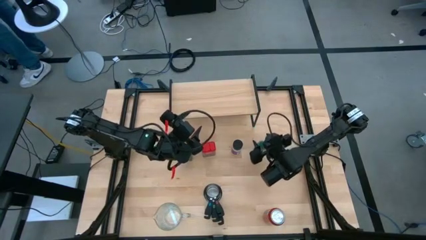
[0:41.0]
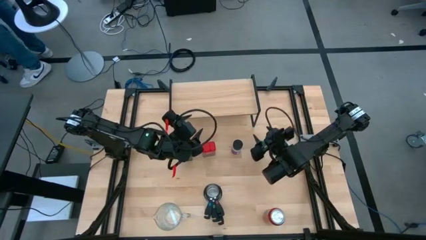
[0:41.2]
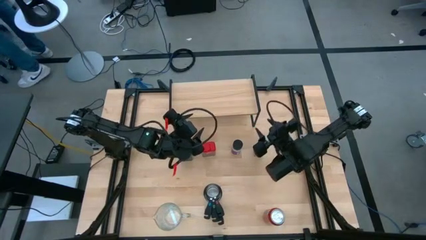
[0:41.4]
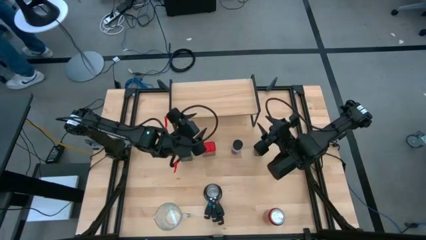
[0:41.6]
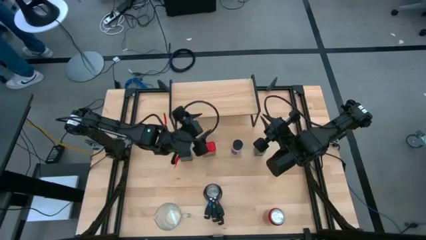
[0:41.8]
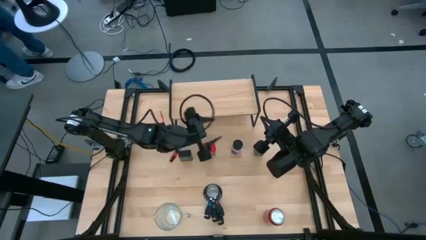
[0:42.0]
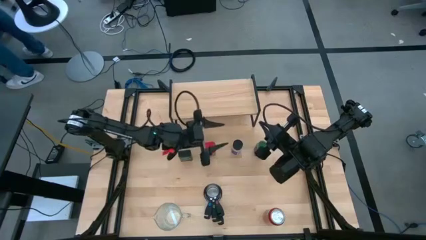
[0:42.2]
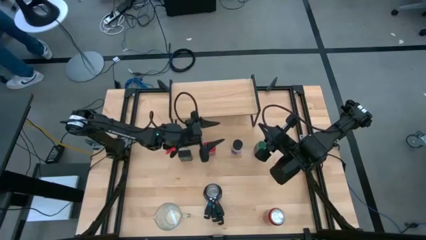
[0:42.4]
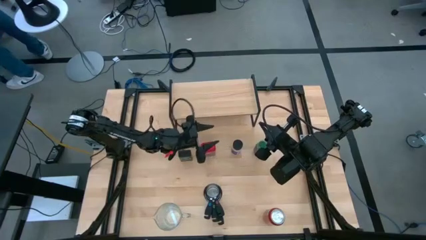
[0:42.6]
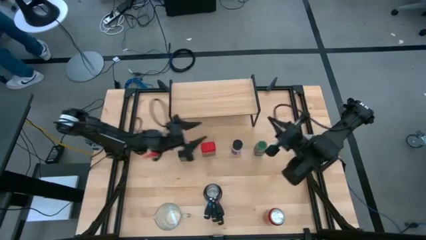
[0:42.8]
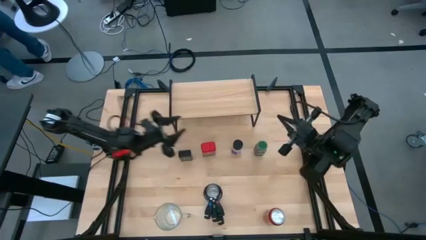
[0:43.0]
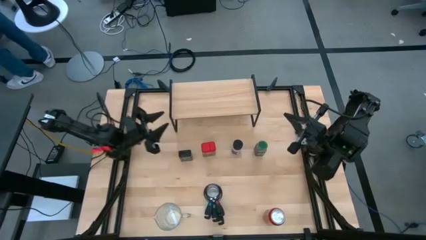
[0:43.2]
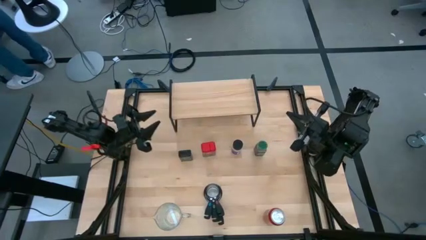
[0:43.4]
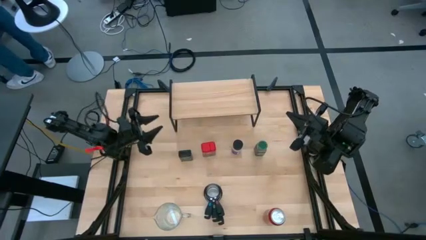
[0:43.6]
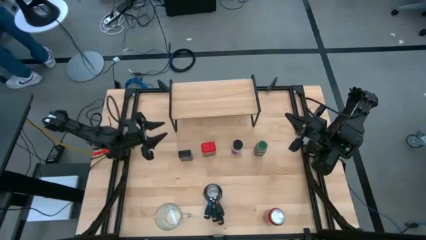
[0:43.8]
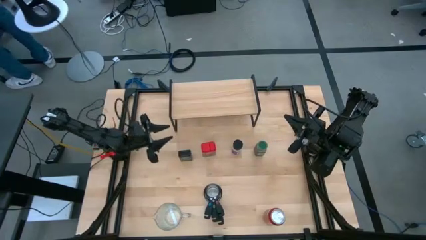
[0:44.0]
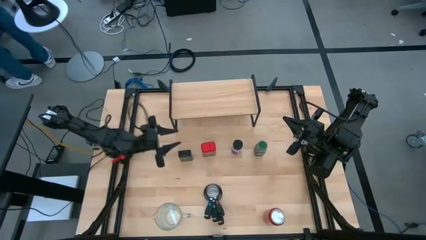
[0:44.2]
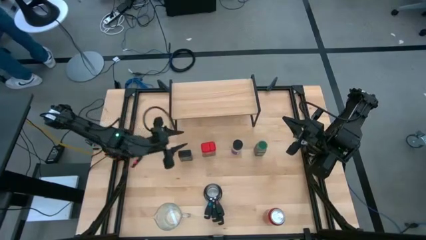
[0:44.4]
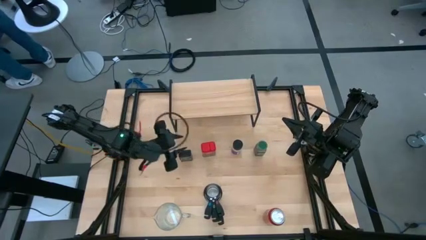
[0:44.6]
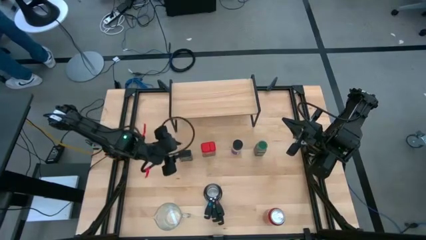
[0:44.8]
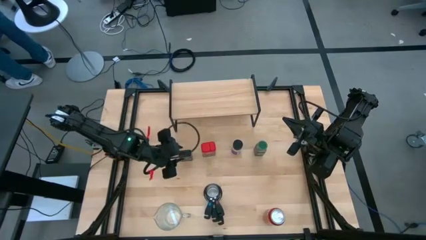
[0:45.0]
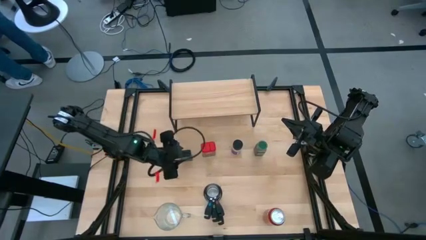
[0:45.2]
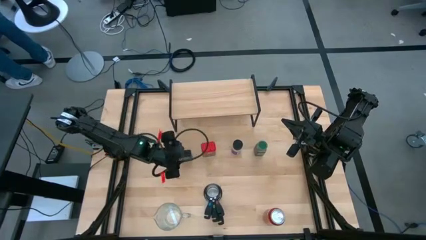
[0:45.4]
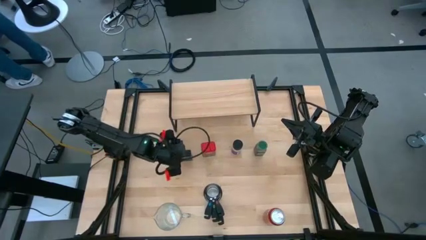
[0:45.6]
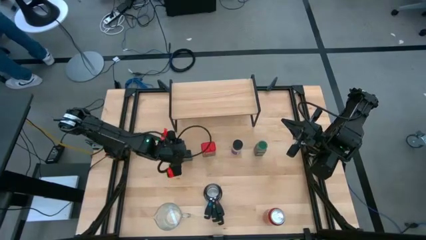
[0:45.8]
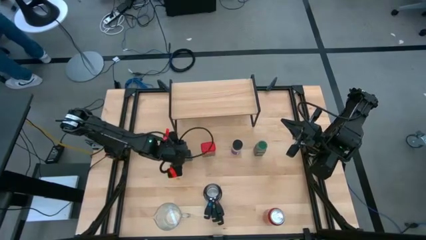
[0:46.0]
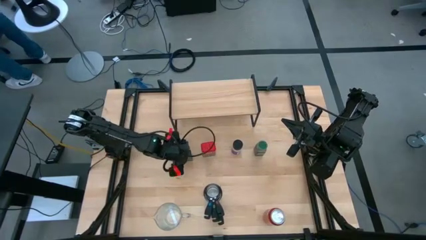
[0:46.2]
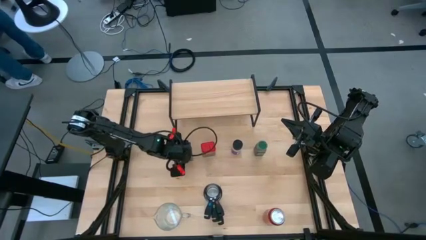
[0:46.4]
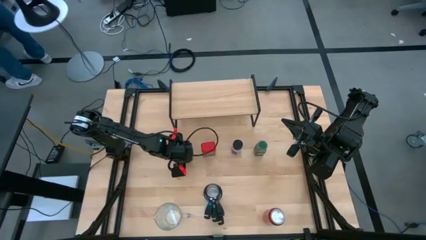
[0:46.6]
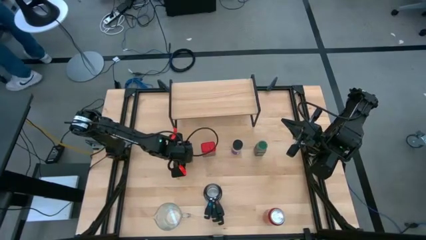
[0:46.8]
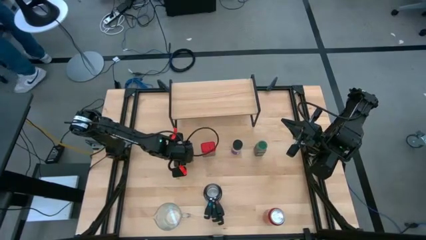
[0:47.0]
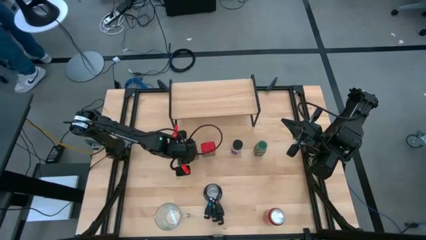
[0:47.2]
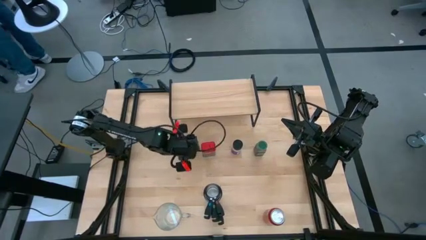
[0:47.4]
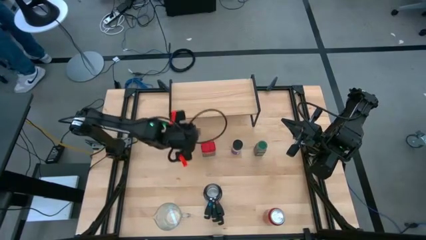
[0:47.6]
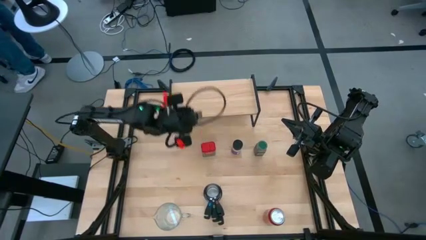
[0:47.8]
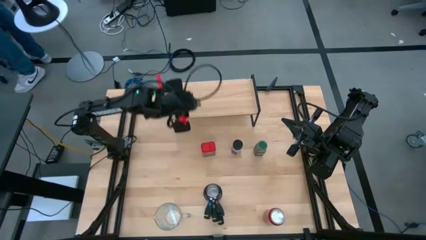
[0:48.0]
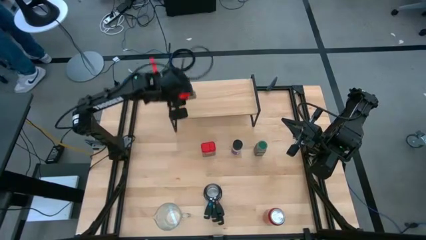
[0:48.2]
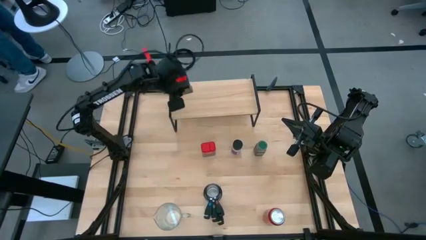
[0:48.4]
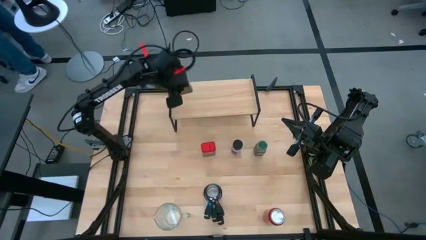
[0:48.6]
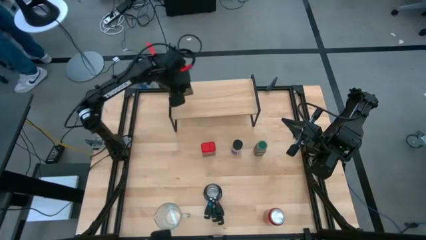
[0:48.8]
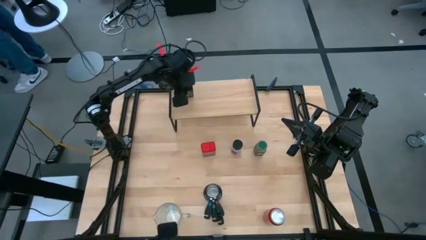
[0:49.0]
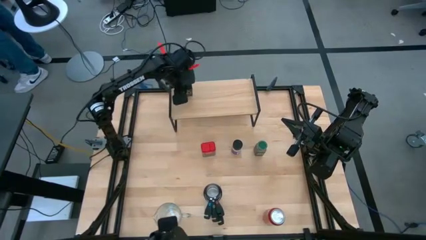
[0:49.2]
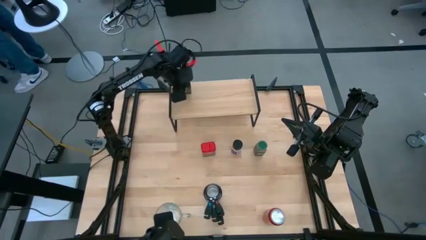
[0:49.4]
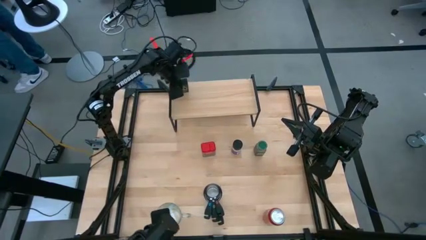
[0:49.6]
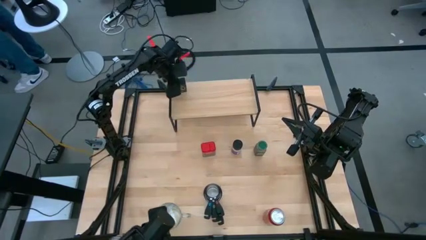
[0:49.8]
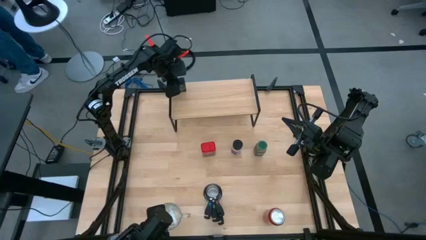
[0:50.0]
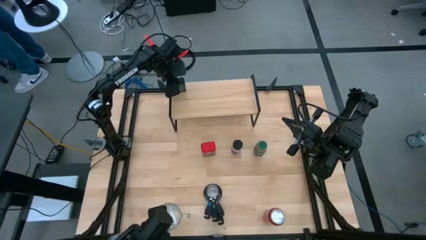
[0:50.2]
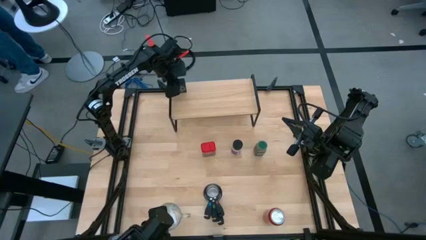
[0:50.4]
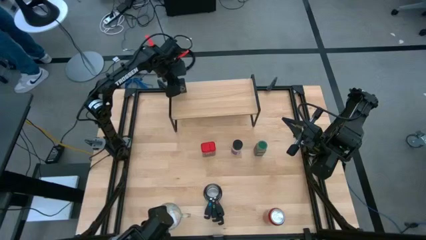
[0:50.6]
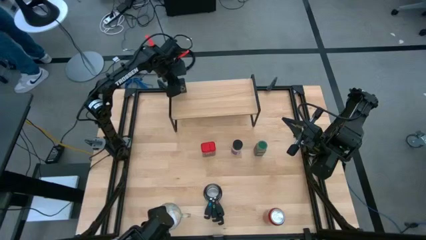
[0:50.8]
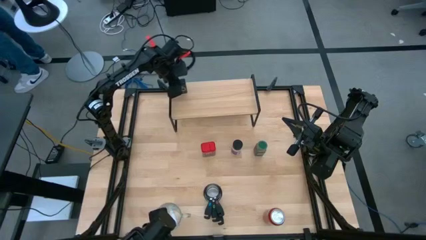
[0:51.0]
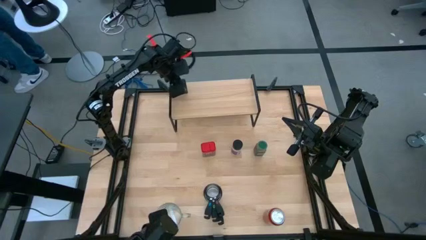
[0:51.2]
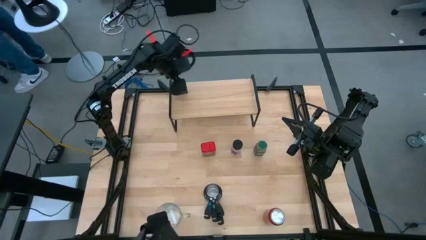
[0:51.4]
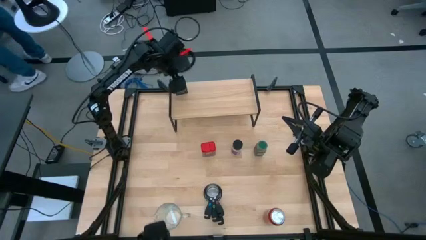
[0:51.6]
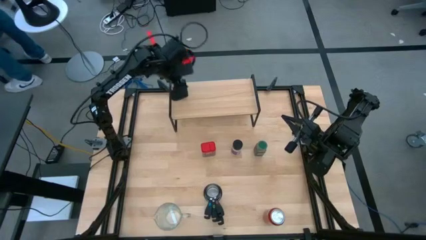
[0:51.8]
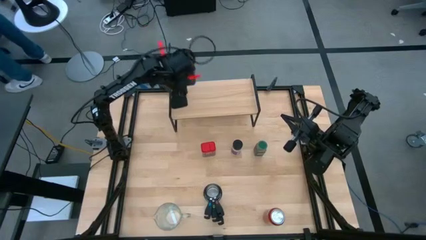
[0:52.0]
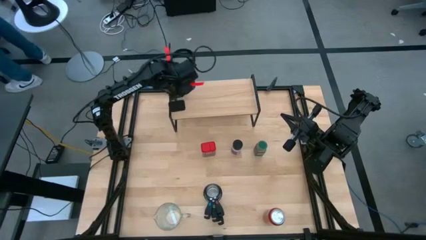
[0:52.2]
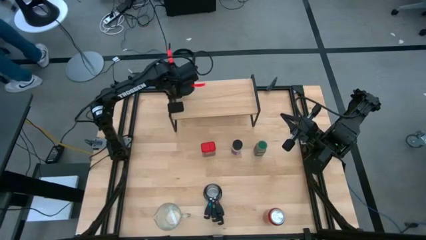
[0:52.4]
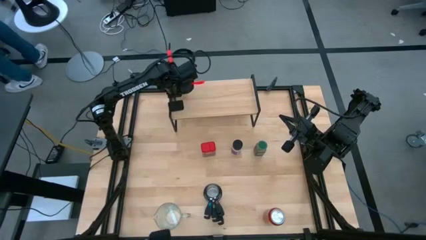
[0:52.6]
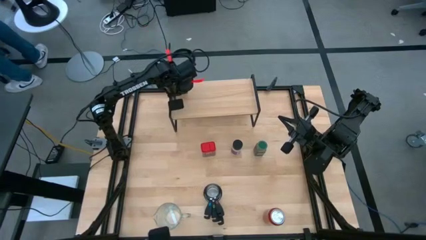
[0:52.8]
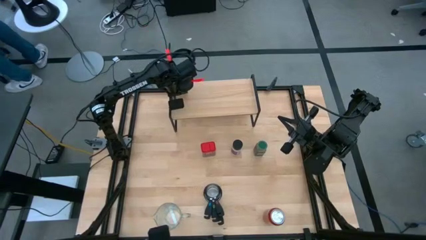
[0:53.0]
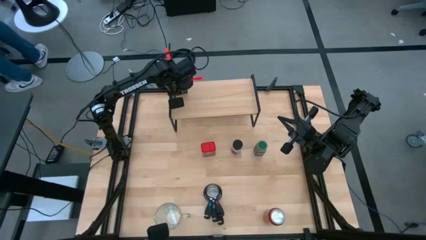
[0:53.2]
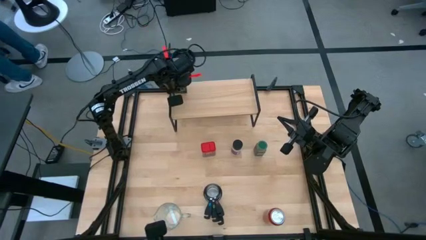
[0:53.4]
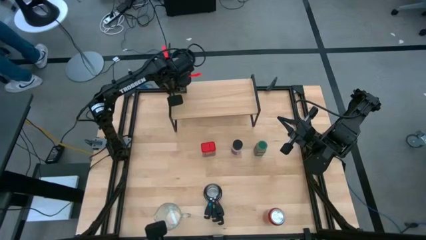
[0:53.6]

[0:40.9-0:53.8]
Task: Shelf spices
Put the black seasoning can on the shelf

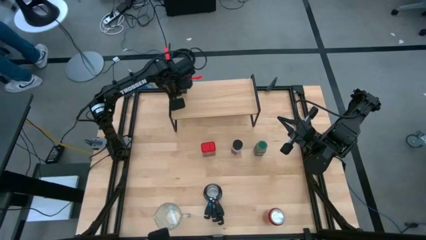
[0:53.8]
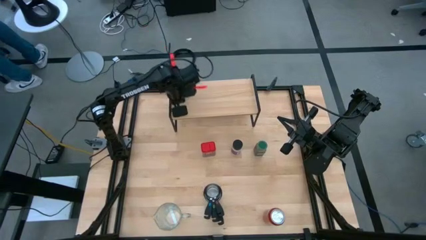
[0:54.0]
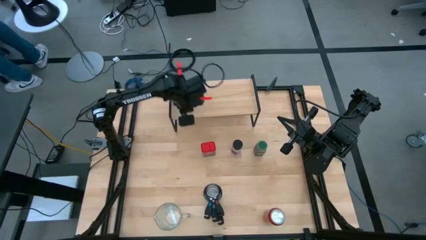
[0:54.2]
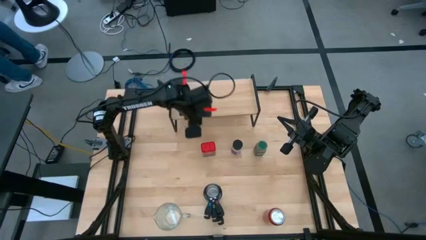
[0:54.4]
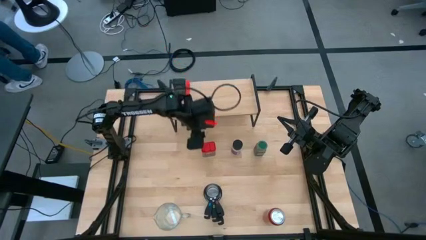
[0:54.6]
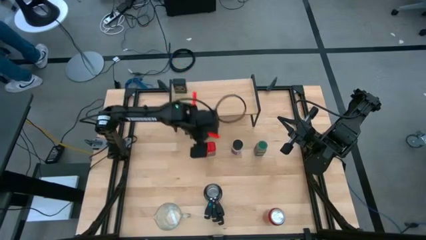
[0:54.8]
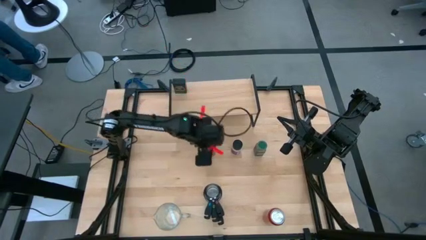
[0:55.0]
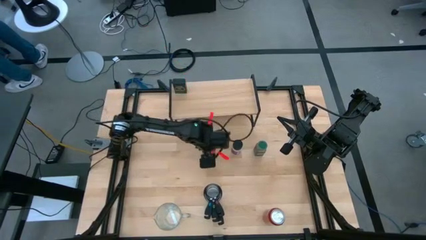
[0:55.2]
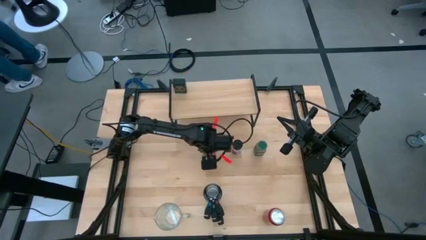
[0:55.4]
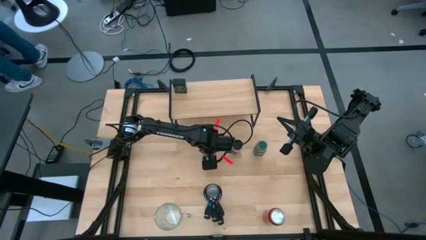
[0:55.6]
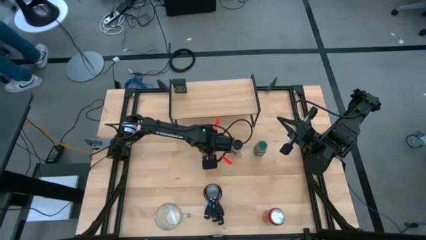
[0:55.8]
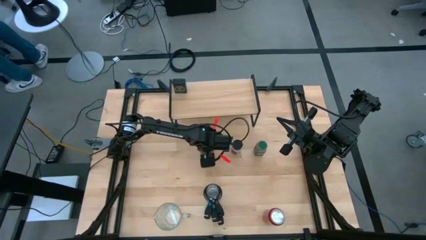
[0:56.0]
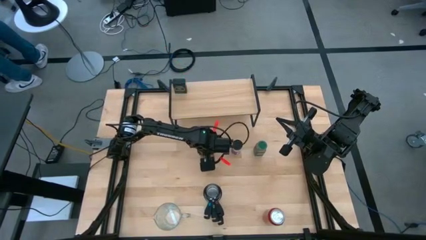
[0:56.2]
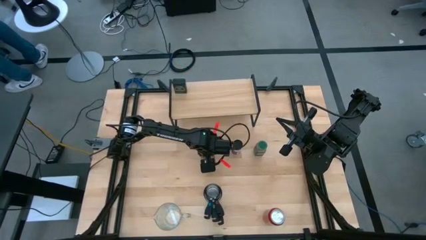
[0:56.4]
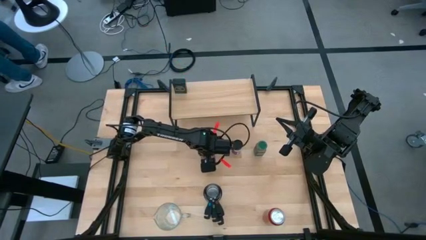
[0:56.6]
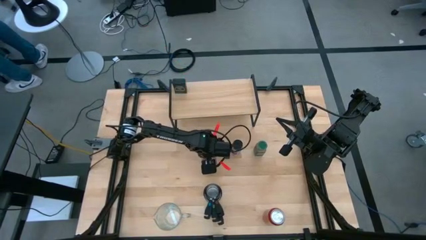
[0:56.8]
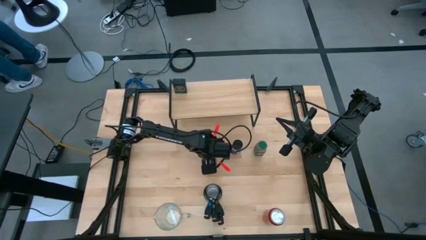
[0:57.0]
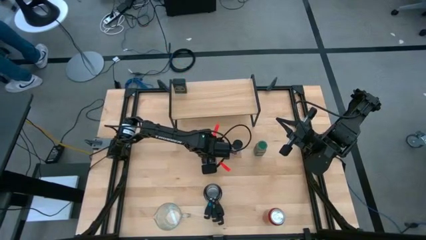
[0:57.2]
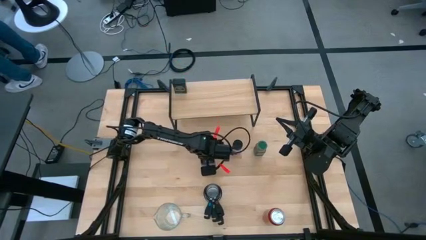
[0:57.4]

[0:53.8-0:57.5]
Put the red seasoning can on the shelf
